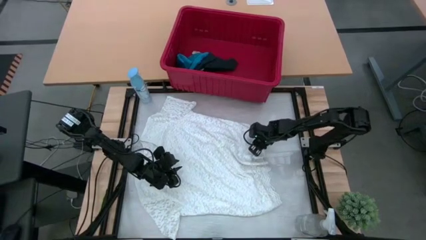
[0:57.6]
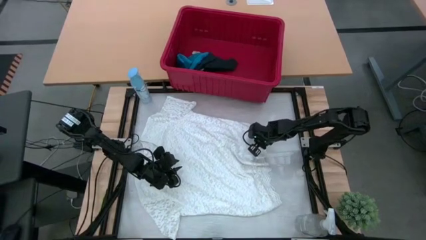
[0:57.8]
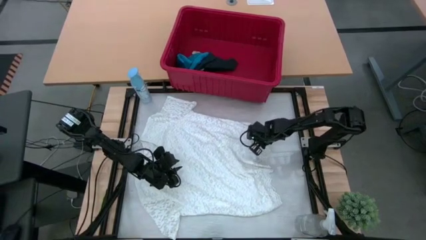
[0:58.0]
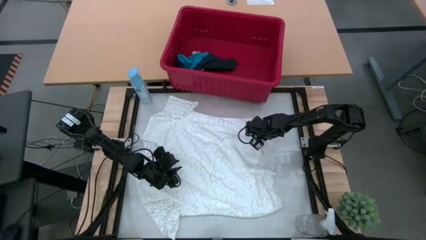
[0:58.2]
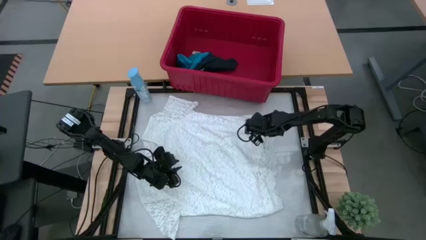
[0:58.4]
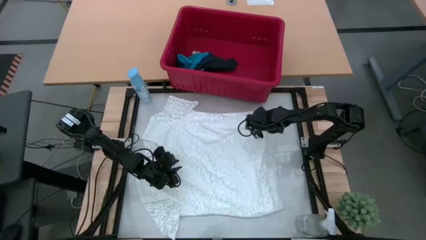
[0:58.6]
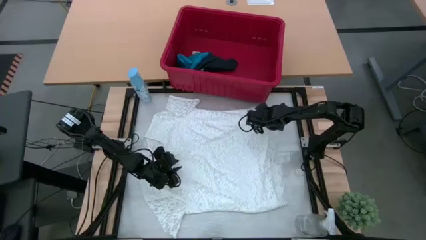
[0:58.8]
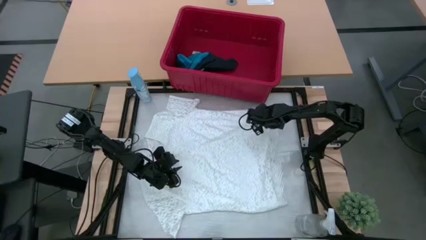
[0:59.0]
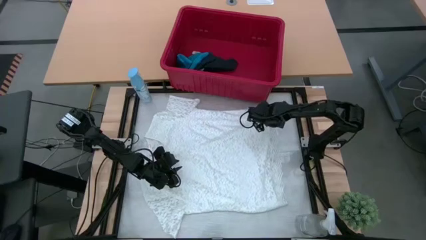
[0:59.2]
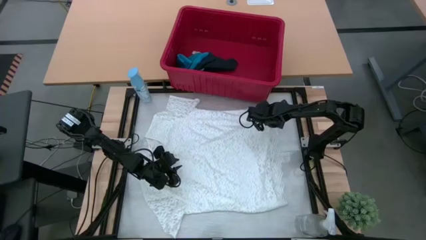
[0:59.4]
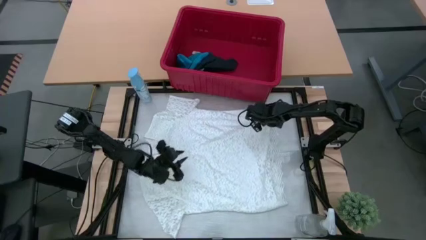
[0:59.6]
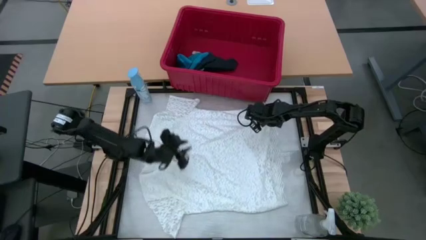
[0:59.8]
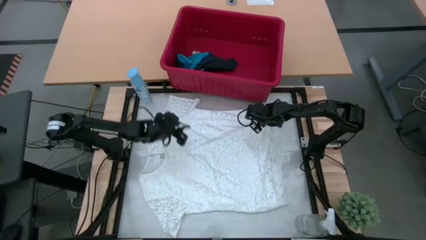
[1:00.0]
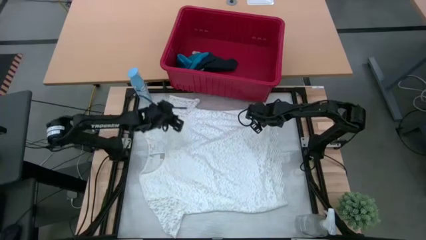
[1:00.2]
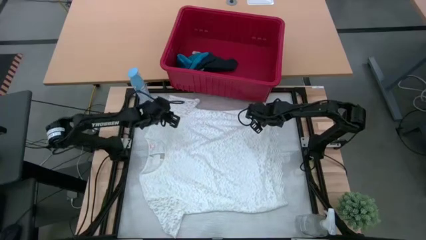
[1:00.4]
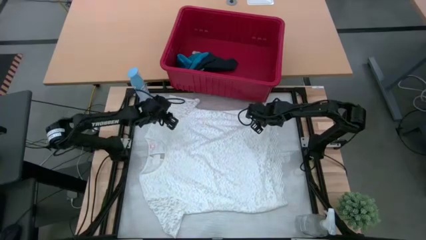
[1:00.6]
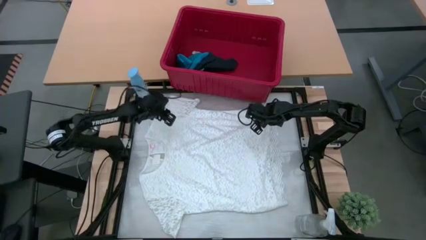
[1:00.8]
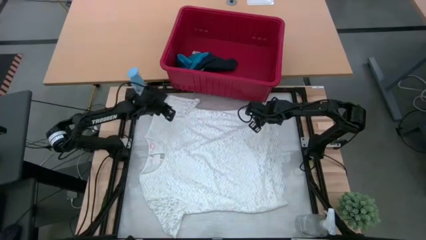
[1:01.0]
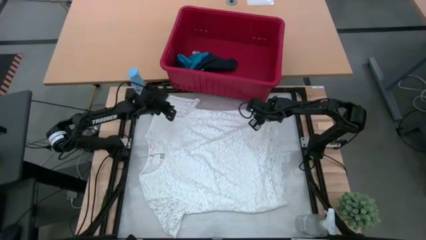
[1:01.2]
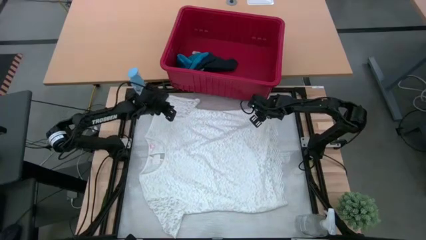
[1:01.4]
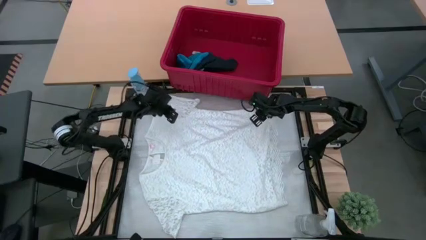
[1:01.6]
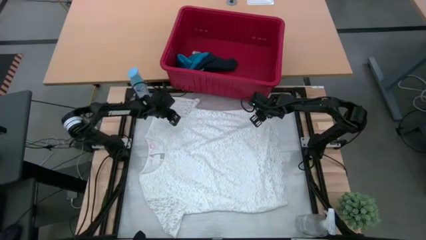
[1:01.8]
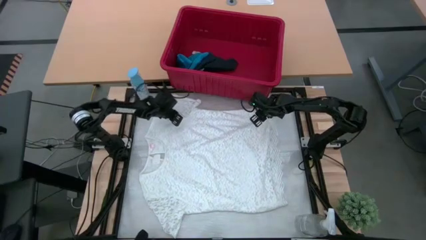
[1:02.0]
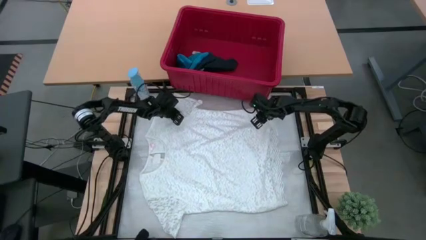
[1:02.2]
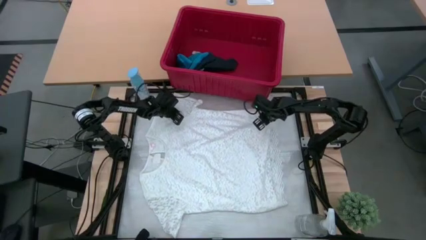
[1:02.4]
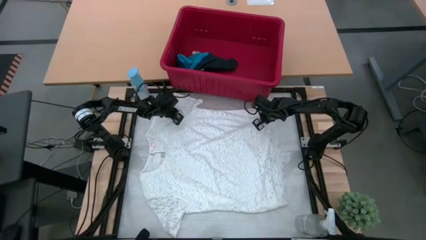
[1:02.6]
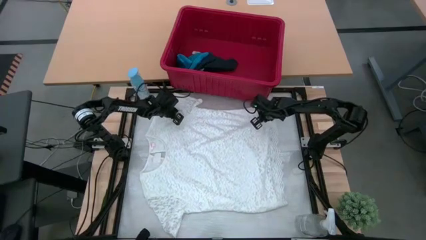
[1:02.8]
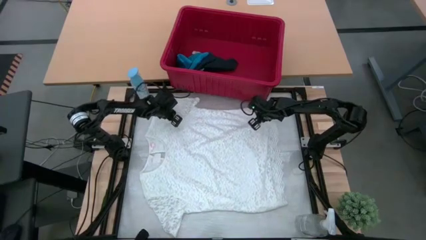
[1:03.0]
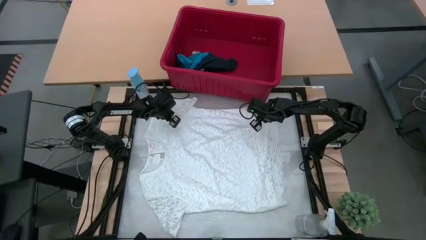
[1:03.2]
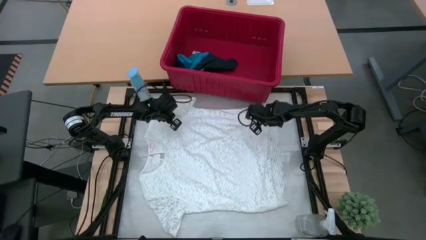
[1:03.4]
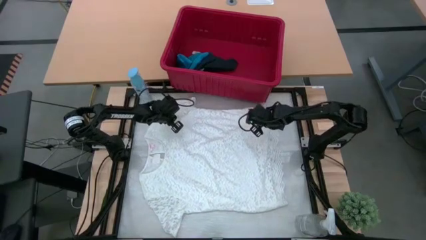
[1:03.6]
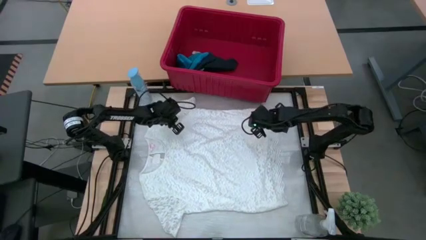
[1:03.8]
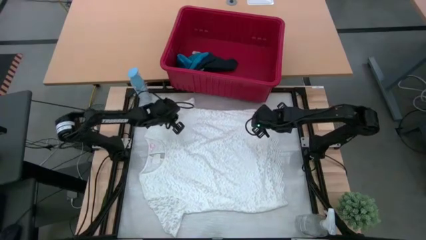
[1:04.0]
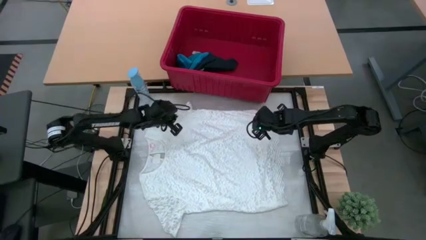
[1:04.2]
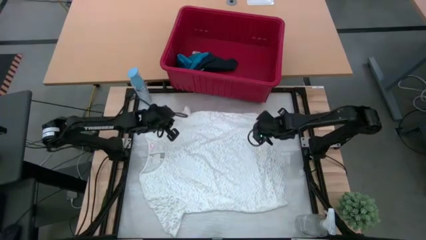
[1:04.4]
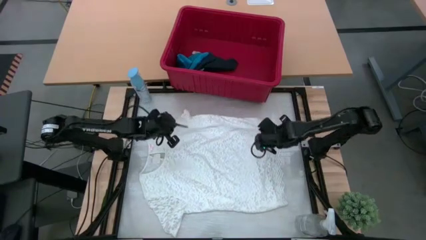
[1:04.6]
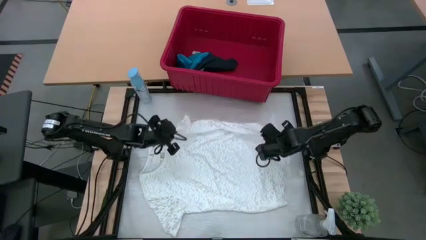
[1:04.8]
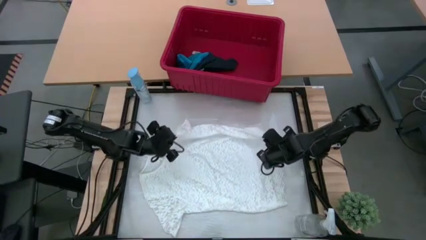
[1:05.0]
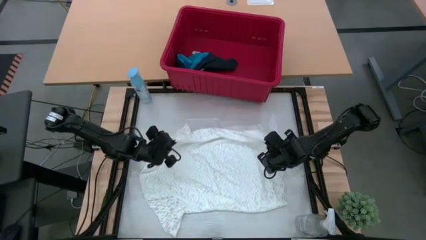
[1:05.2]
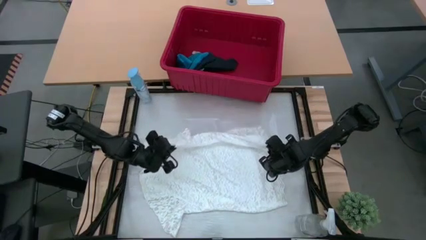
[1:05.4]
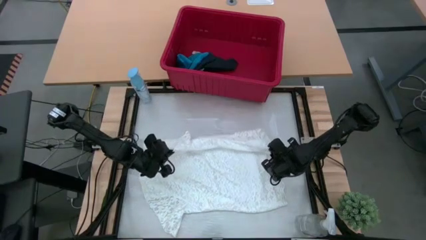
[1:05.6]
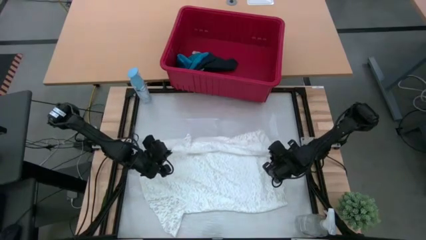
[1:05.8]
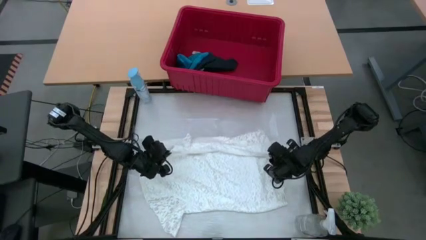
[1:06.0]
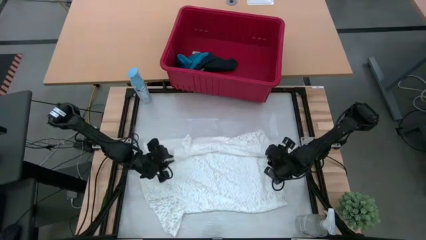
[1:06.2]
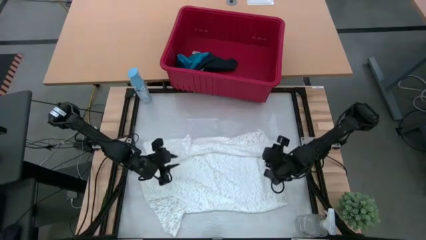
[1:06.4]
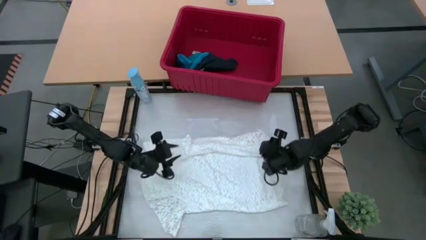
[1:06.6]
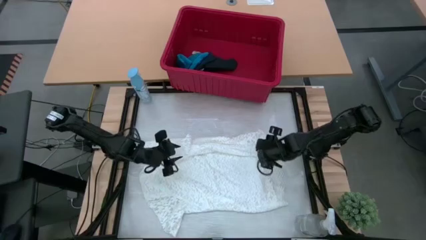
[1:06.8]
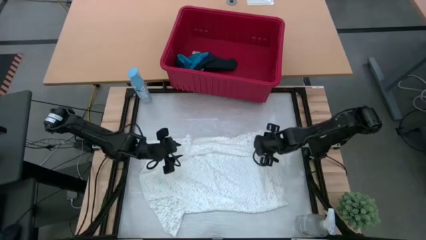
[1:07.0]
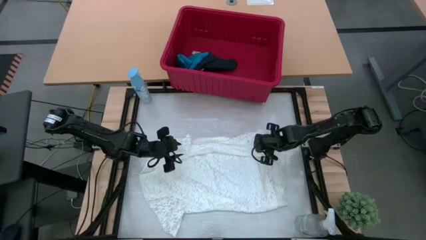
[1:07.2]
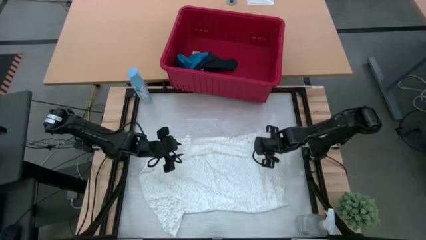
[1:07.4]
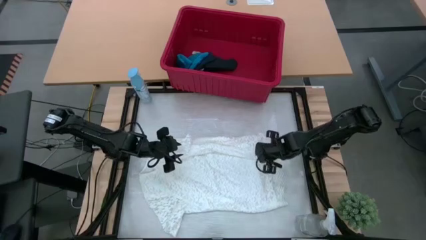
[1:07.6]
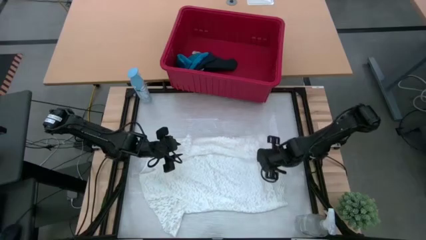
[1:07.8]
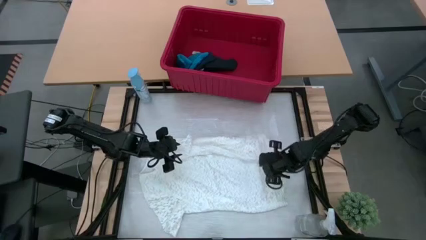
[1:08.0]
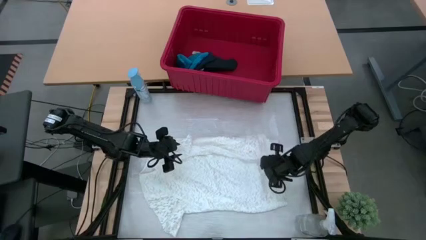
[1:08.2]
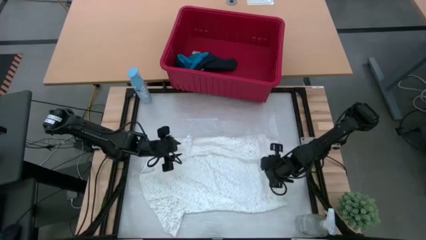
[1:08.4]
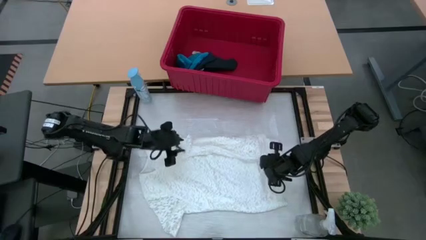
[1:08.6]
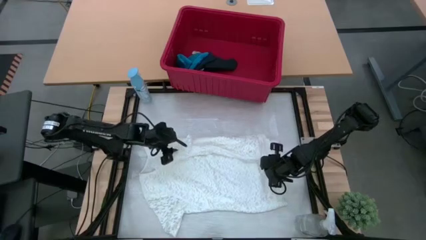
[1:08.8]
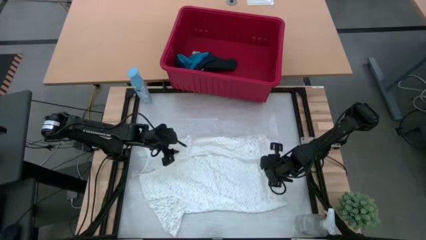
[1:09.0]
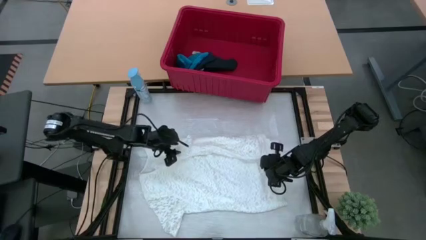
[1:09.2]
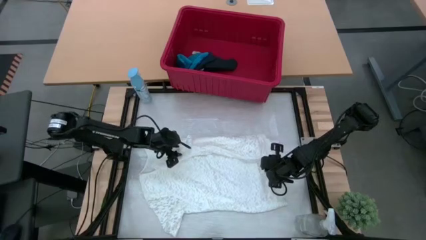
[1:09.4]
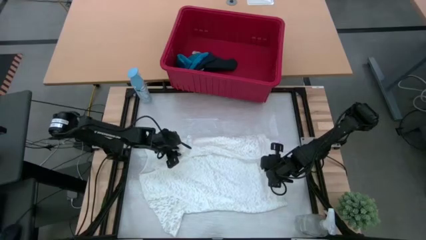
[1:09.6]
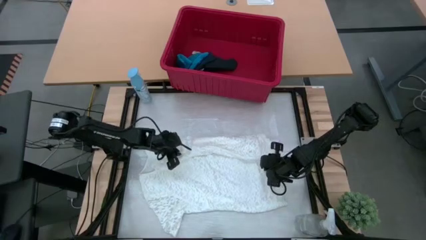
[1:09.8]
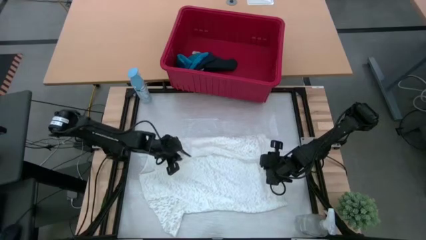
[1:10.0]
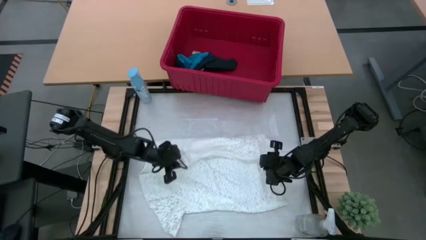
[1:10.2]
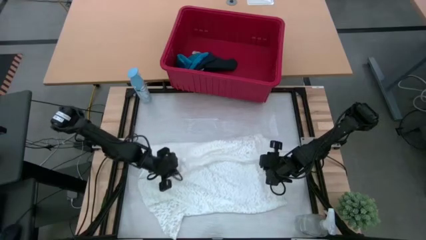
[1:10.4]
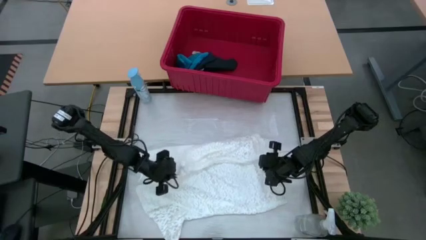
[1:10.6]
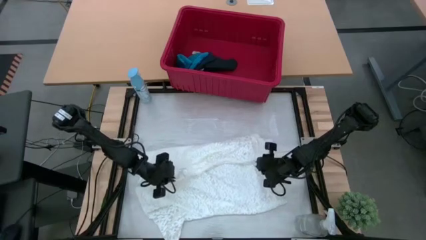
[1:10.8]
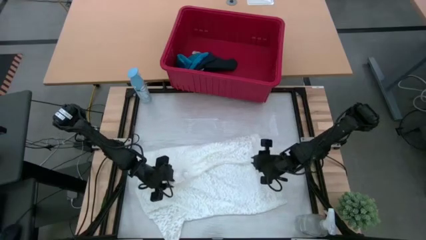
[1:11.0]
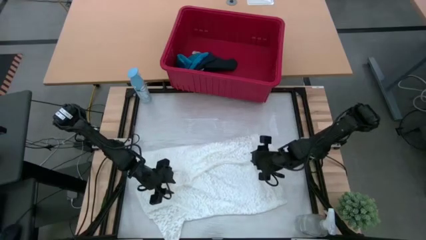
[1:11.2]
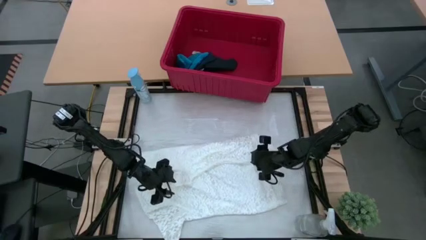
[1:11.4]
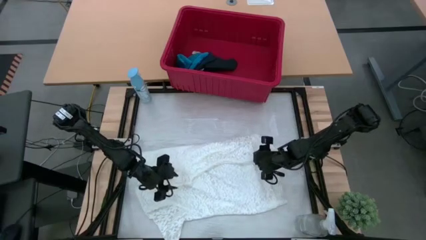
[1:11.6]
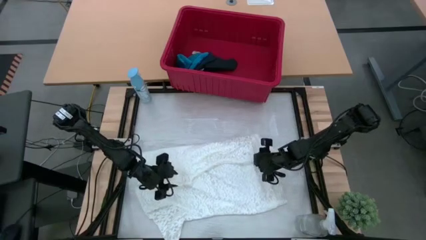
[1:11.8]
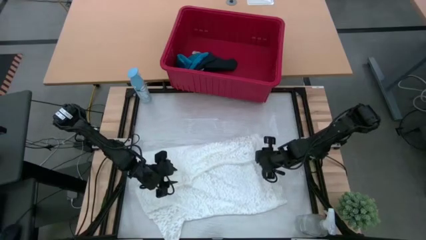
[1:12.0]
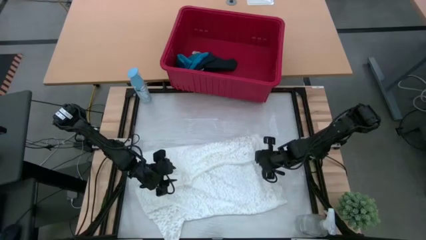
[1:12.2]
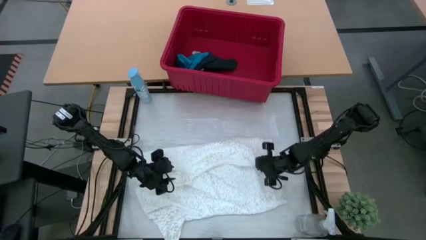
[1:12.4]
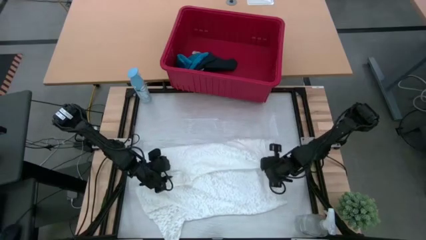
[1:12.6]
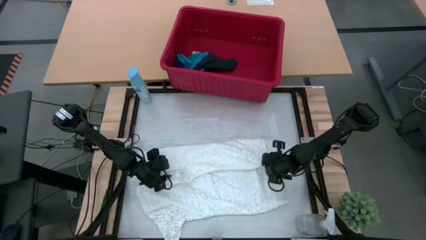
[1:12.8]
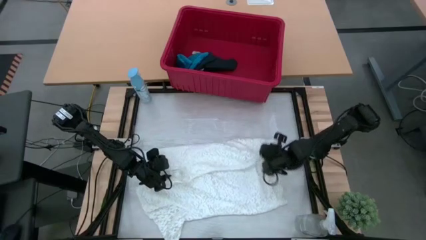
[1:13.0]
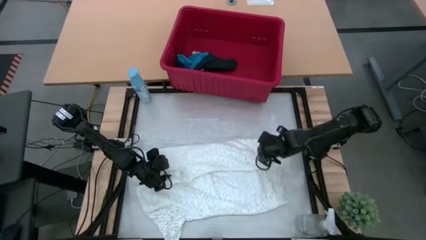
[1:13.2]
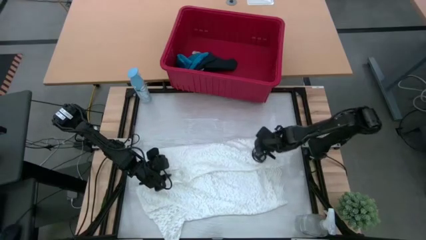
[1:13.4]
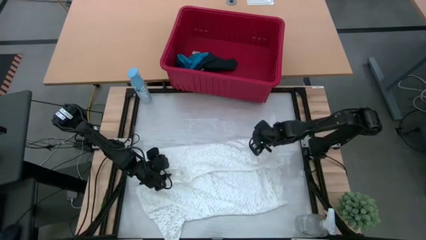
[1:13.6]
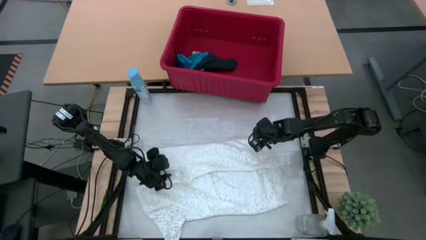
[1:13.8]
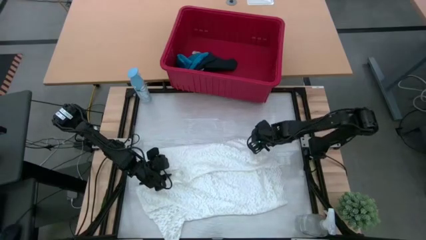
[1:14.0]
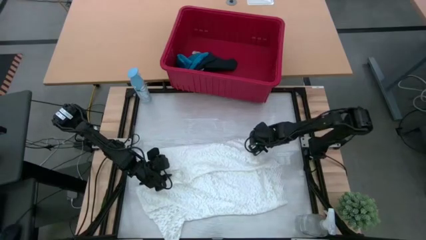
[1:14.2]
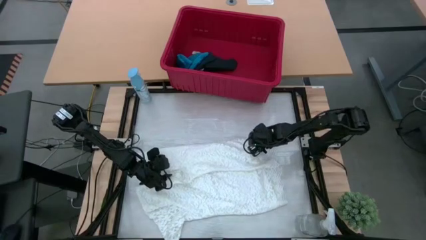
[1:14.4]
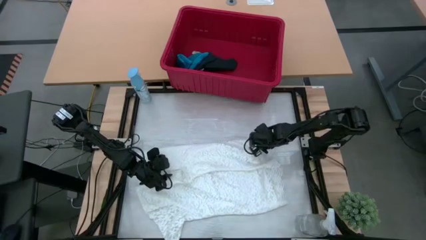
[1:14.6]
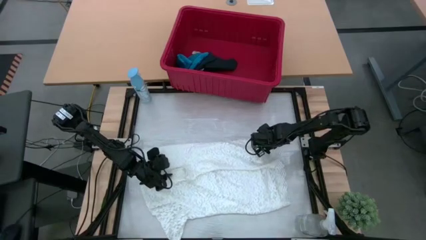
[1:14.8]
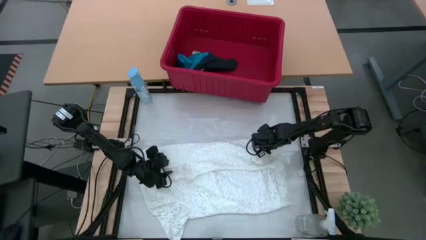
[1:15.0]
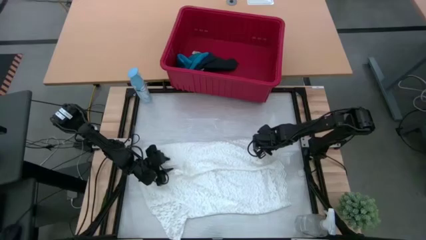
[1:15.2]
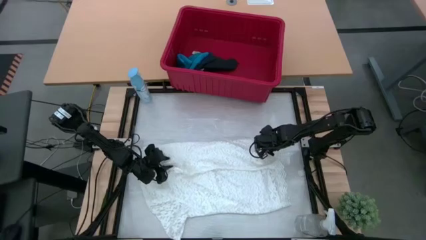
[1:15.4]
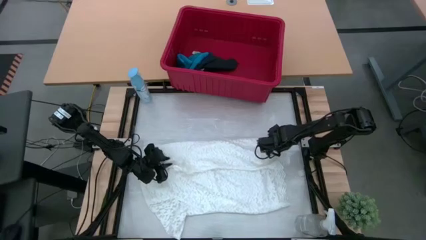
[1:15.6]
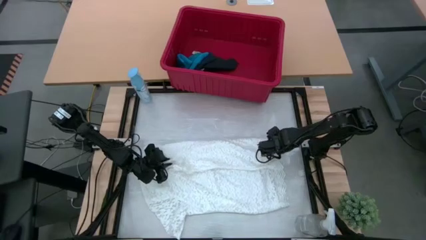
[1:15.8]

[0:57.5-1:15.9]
Task: Fold Laundry from Bin
Fold the white shirt
